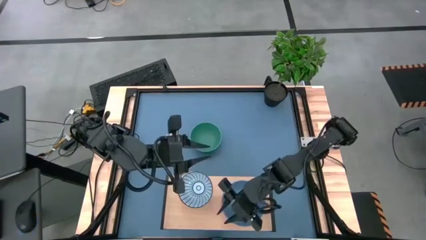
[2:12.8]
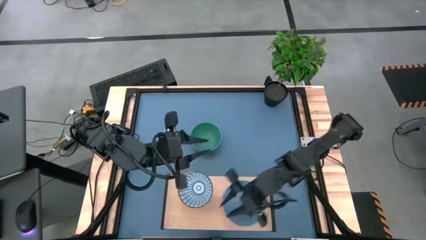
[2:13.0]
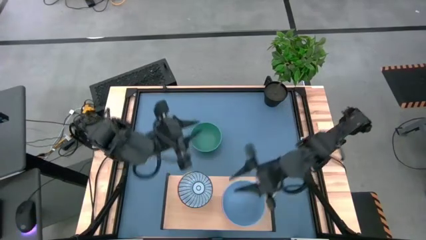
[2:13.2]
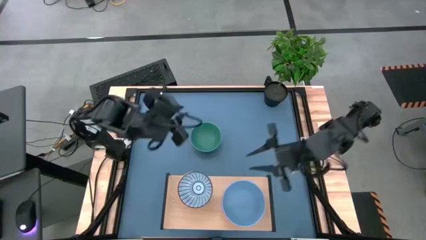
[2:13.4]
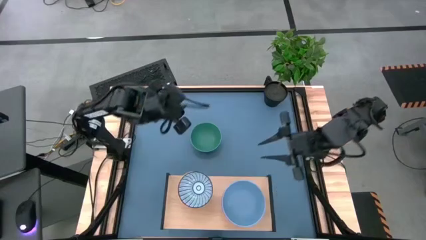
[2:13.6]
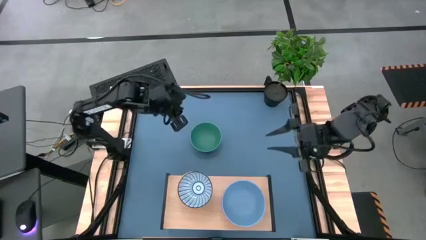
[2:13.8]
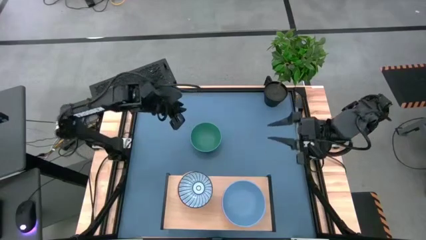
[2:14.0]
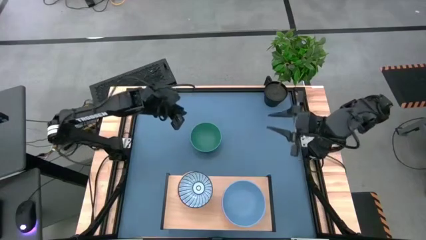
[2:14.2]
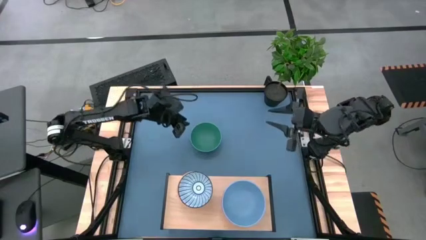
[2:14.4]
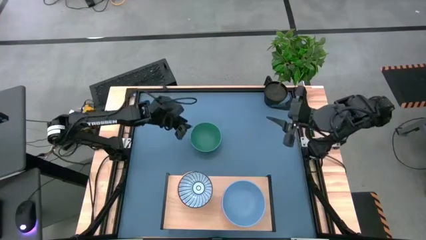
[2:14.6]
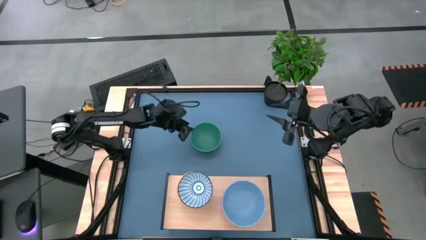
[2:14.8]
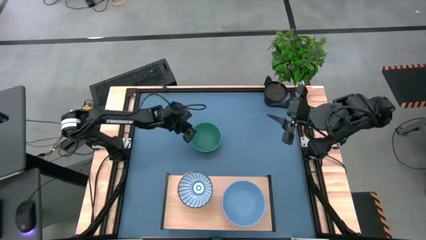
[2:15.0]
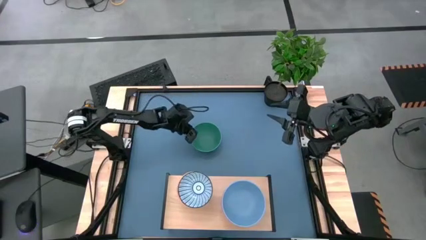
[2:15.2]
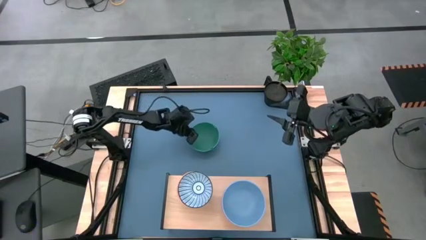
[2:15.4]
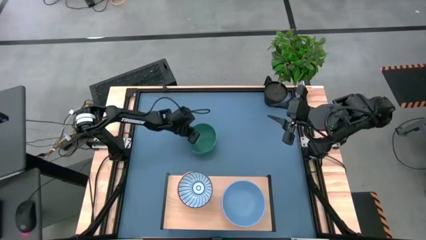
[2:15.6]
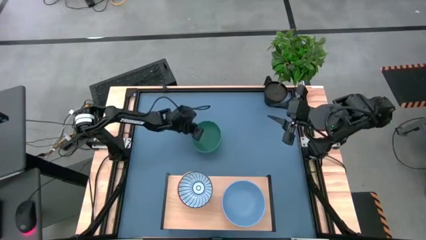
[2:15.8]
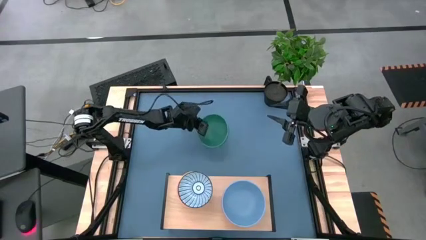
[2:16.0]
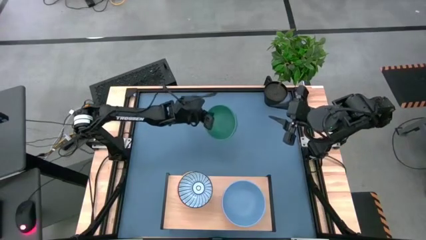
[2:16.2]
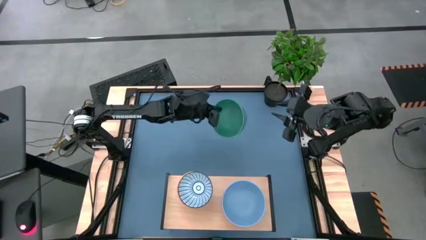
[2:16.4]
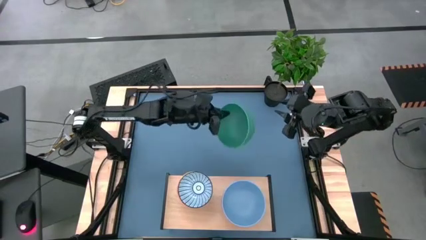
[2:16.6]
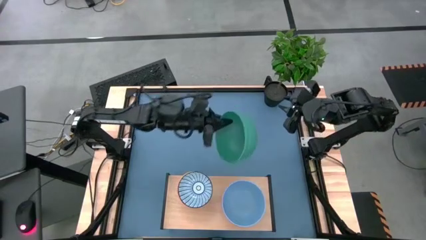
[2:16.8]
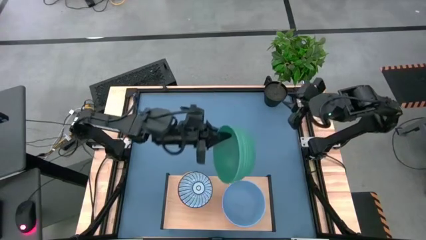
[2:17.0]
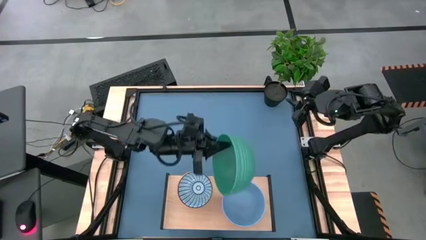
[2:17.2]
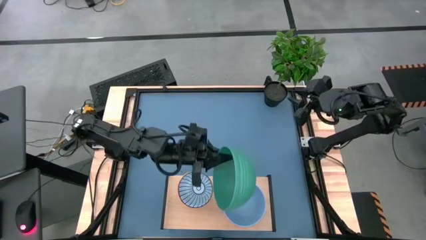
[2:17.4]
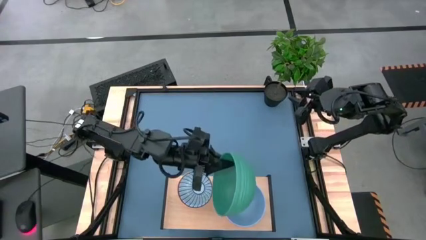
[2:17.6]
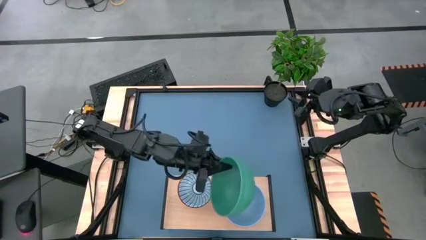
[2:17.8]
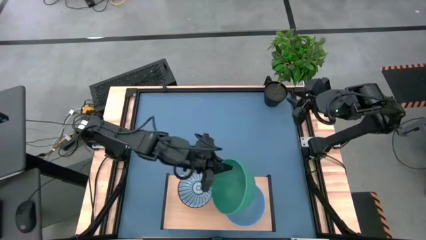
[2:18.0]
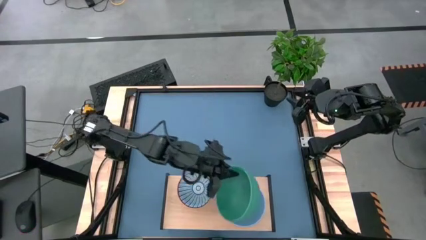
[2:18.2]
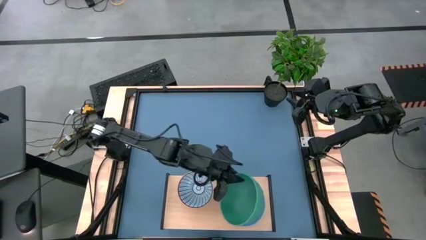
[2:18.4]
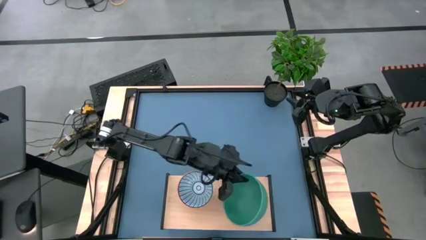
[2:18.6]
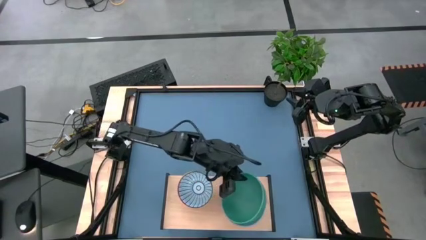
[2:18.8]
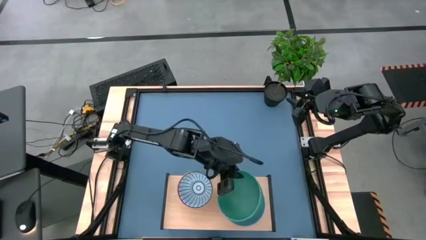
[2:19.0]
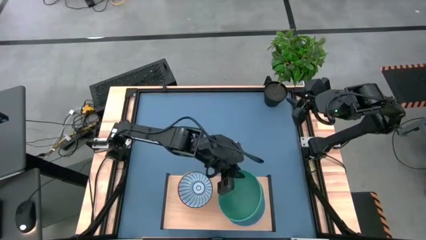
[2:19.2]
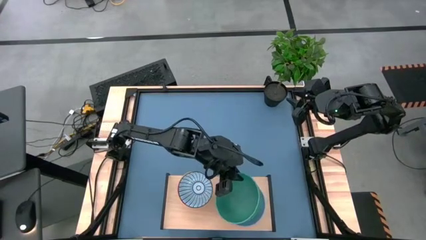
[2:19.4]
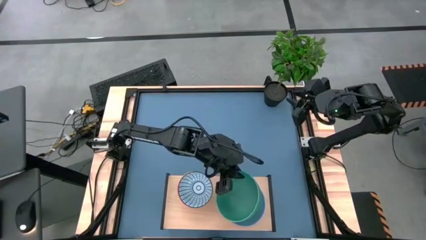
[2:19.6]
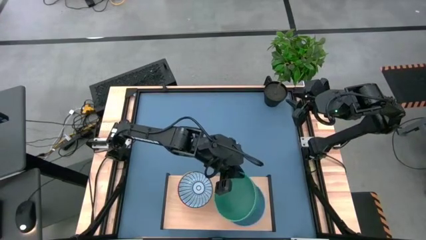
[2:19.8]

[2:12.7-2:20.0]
Task: Place and stack bowls onto a shelf
Stack the green bowl on top of the blue bowl on the shelf

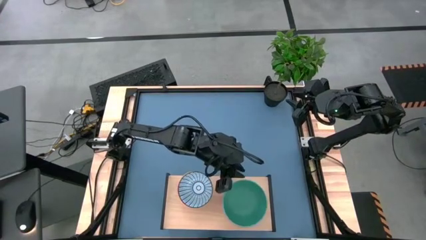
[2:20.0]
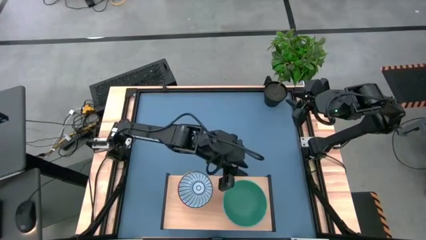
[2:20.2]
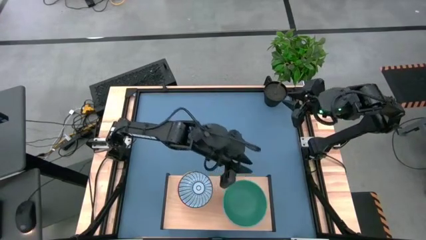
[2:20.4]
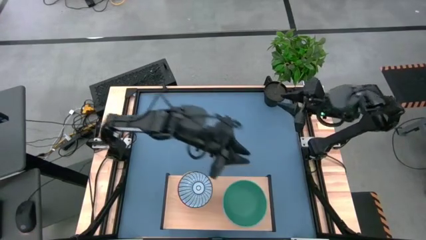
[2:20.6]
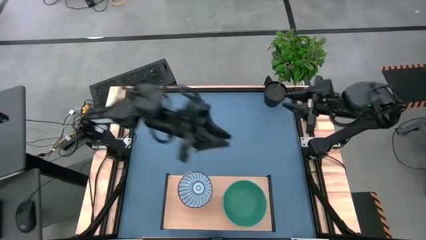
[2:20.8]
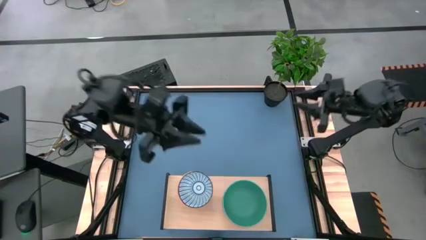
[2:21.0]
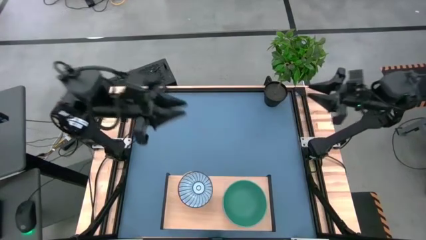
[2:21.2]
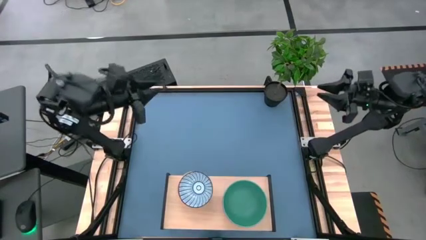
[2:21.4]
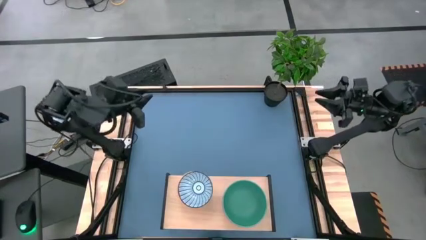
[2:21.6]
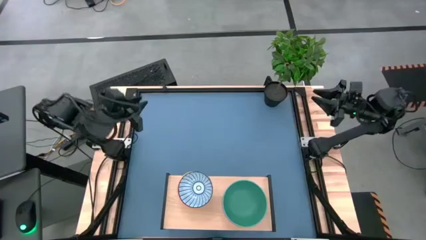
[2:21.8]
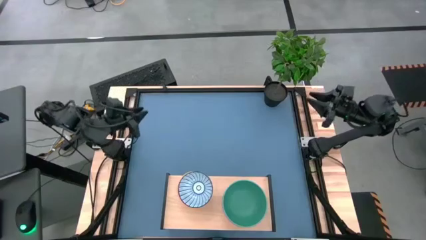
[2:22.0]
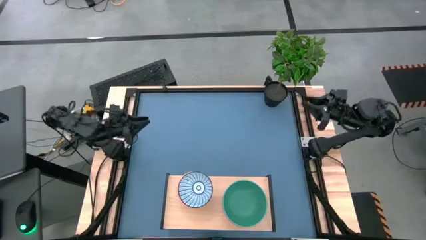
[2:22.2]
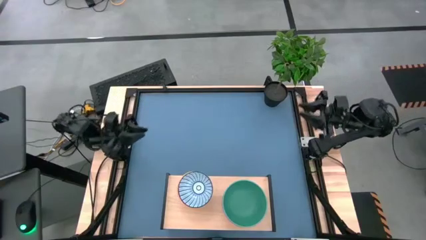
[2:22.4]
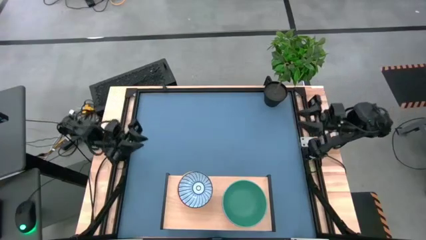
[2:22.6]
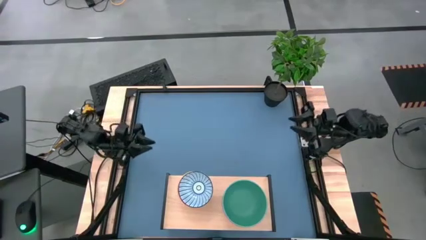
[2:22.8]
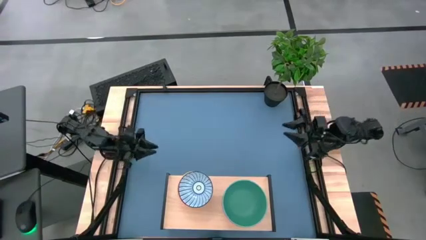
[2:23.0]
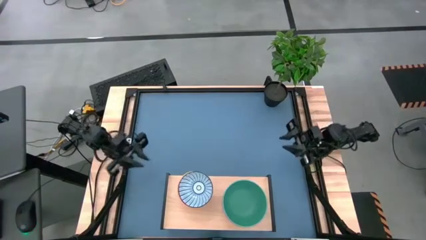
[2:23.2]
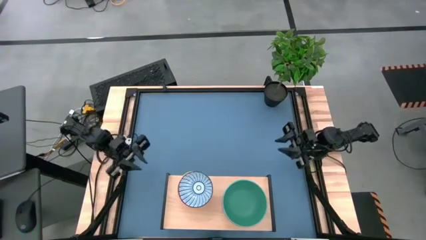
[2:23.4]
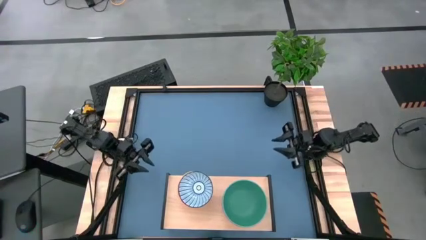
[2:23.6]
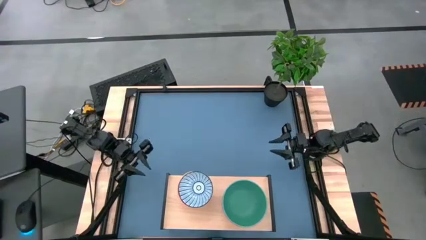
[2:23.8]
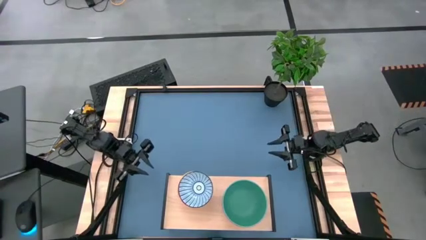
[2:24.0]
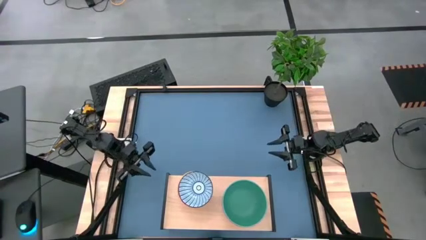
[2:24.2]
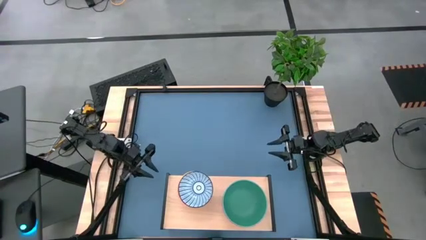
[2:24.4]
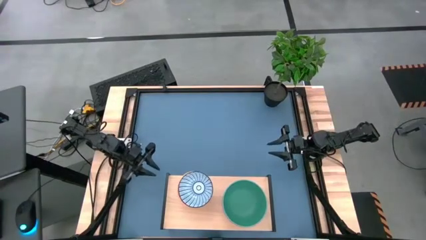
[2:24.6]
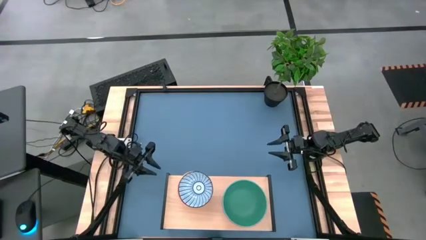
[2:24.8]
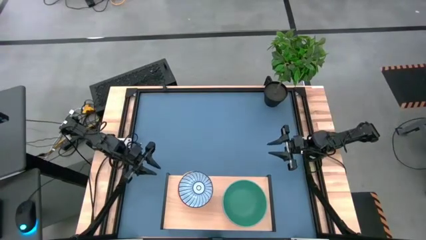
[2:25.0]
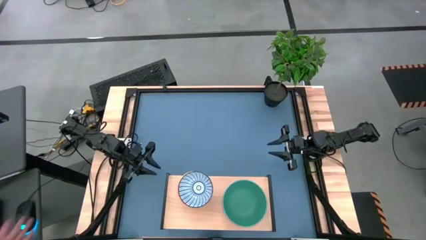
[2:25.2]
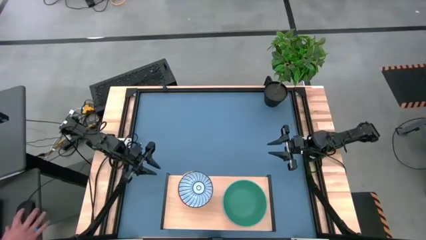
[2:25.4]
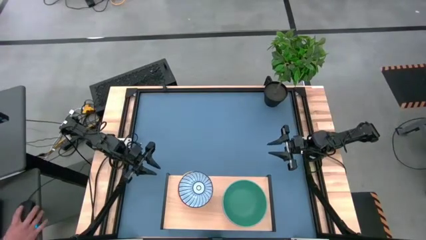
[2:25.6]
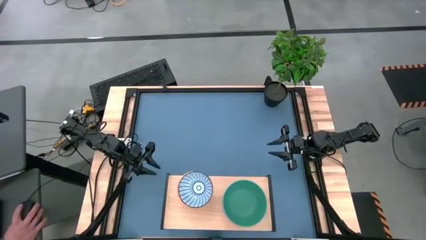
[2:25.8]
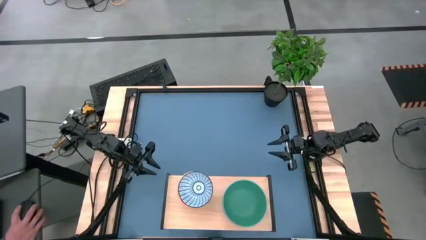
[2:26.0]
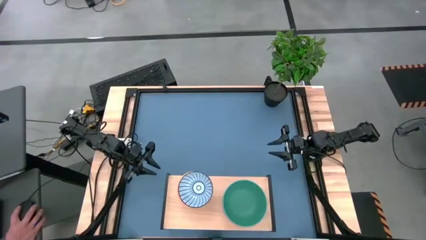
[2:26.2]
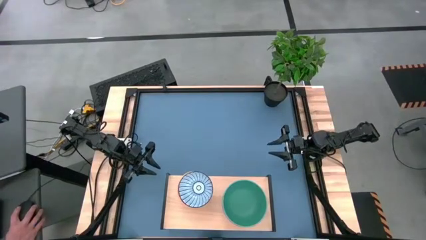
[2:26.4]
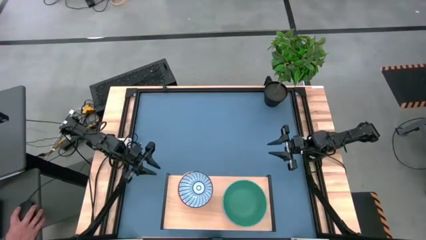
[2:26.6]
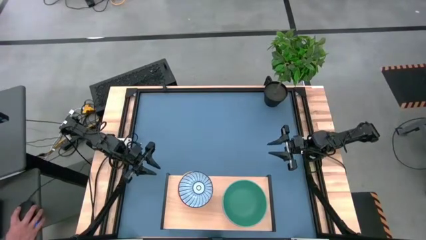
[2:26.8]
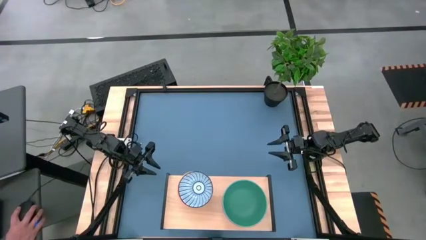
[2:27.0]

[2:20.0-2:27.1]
Return to Home Position
